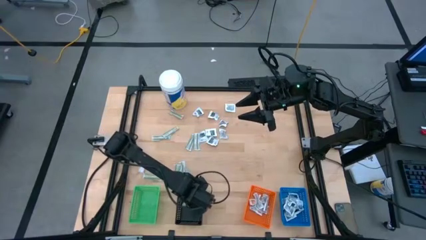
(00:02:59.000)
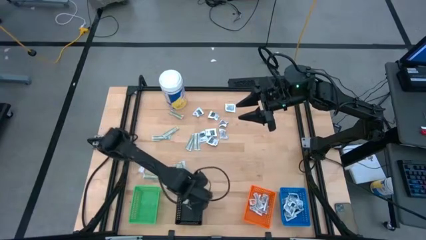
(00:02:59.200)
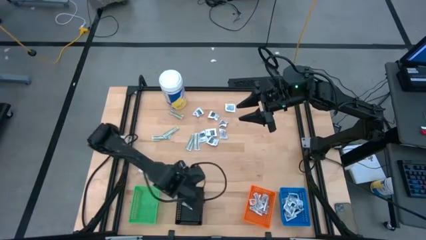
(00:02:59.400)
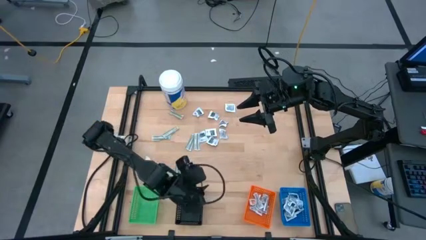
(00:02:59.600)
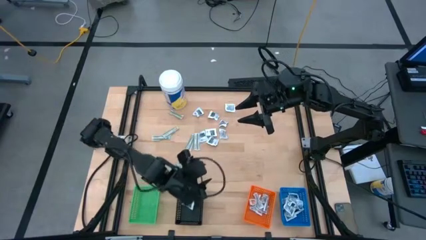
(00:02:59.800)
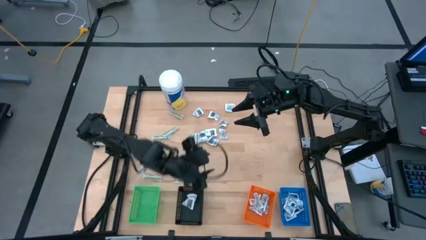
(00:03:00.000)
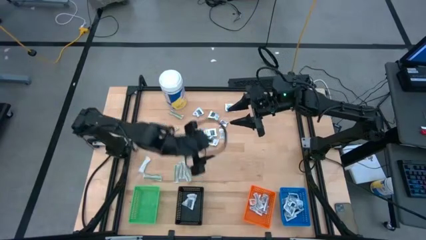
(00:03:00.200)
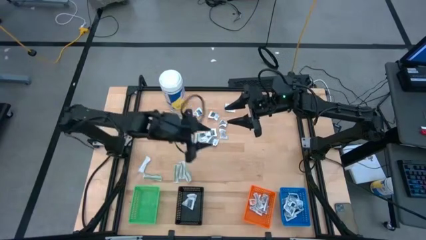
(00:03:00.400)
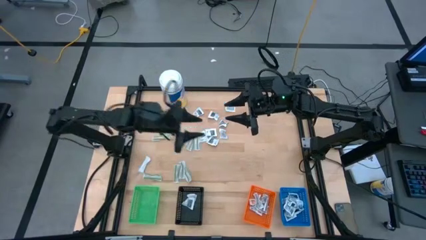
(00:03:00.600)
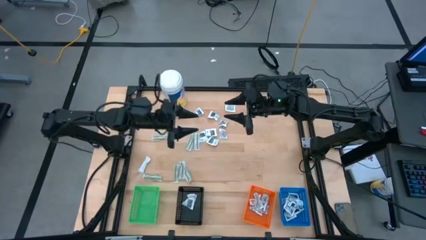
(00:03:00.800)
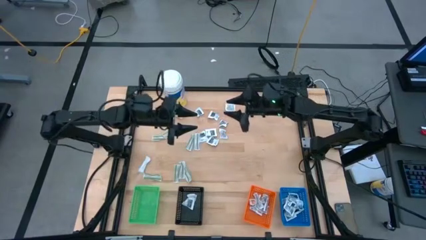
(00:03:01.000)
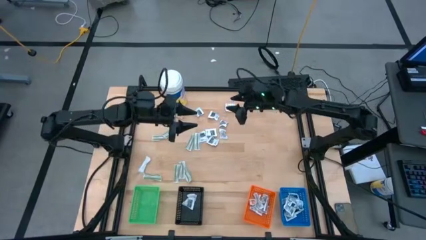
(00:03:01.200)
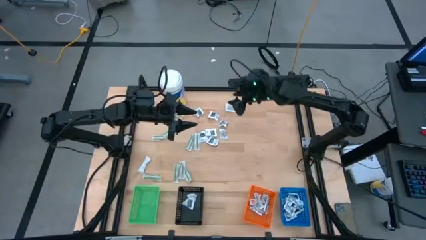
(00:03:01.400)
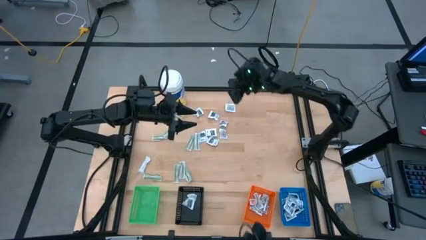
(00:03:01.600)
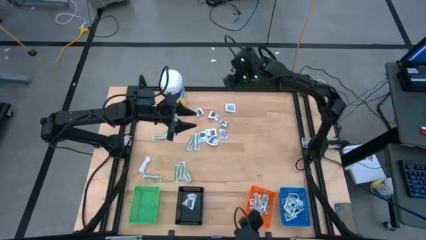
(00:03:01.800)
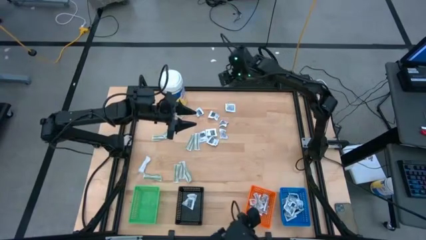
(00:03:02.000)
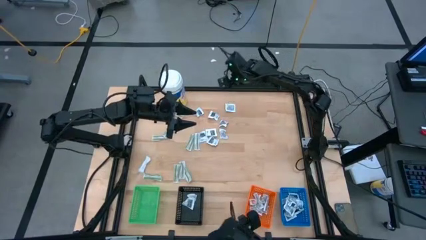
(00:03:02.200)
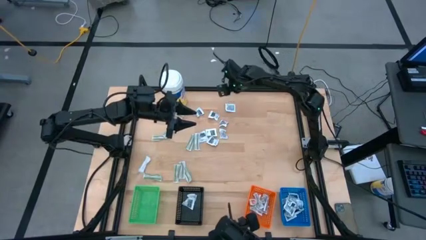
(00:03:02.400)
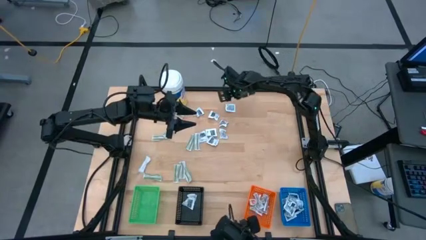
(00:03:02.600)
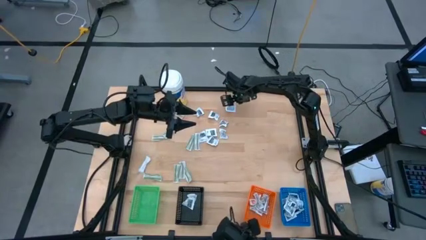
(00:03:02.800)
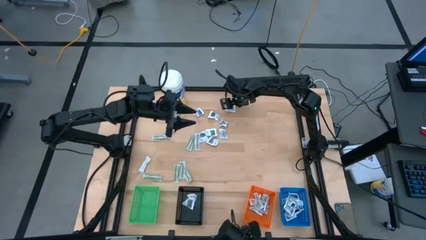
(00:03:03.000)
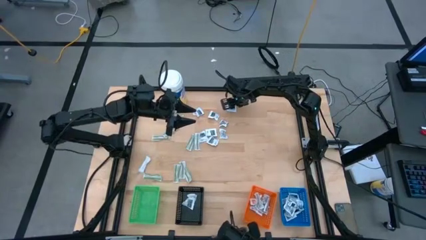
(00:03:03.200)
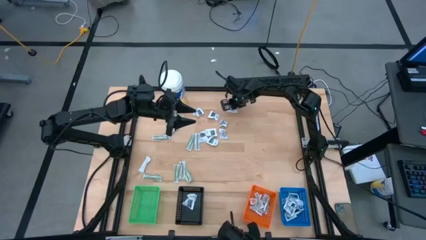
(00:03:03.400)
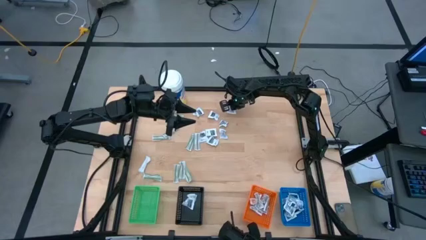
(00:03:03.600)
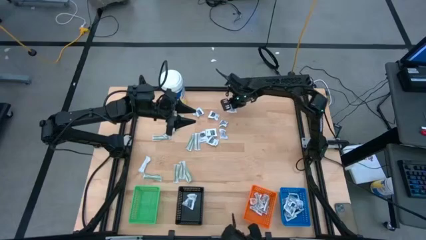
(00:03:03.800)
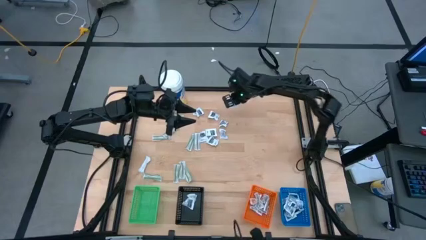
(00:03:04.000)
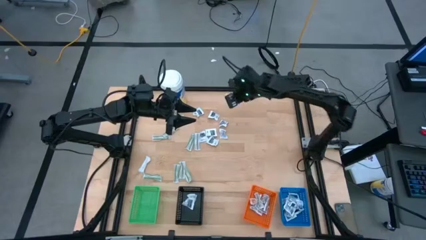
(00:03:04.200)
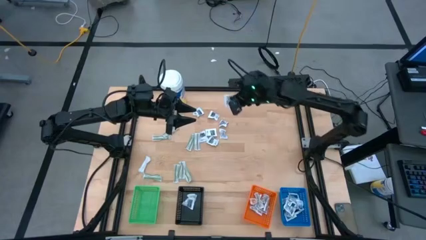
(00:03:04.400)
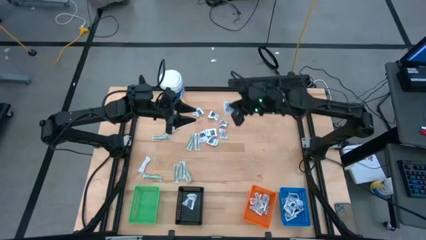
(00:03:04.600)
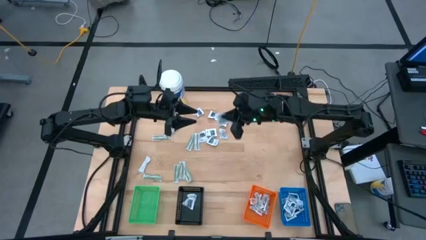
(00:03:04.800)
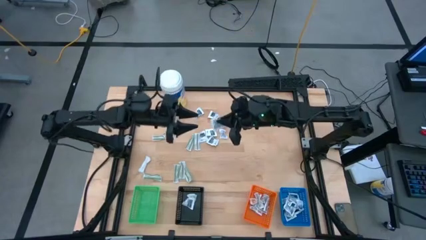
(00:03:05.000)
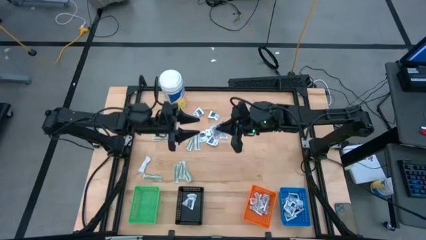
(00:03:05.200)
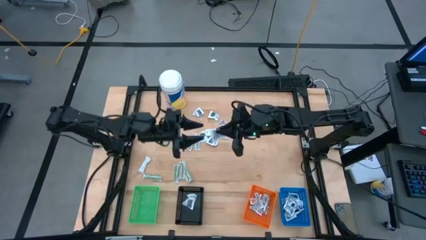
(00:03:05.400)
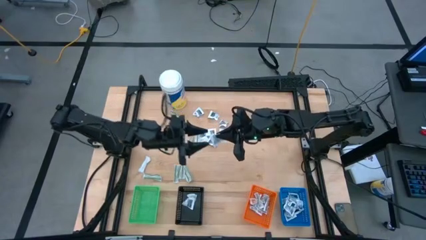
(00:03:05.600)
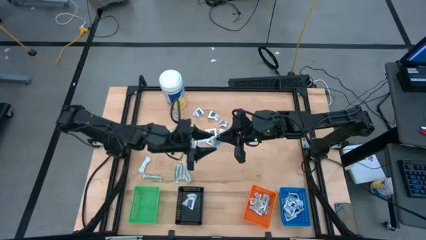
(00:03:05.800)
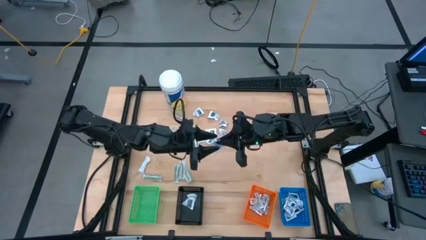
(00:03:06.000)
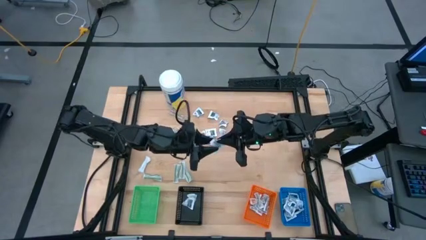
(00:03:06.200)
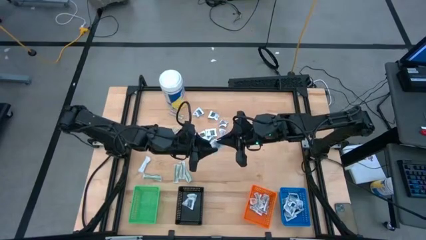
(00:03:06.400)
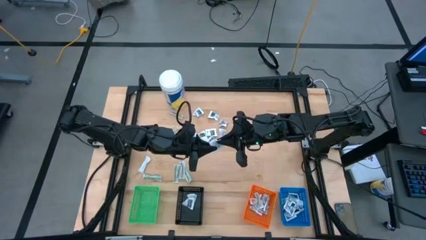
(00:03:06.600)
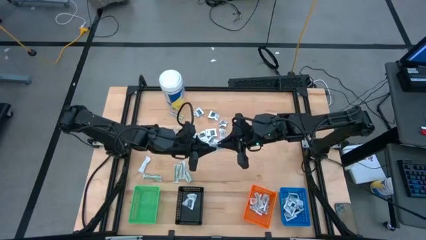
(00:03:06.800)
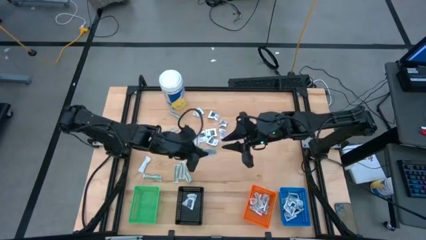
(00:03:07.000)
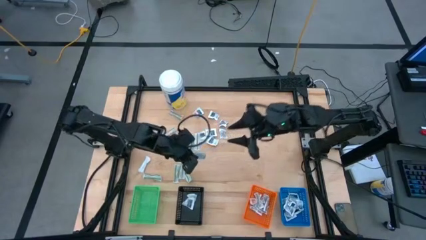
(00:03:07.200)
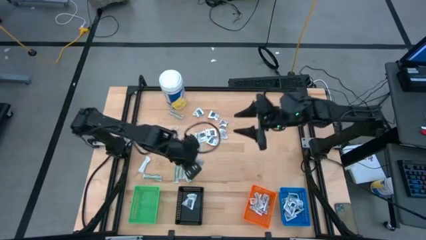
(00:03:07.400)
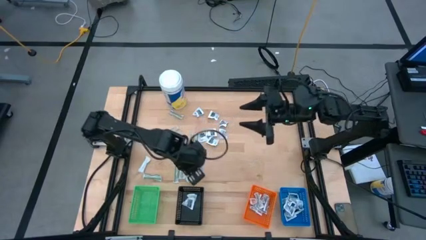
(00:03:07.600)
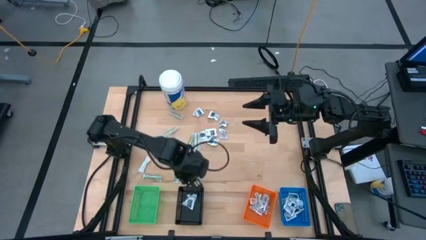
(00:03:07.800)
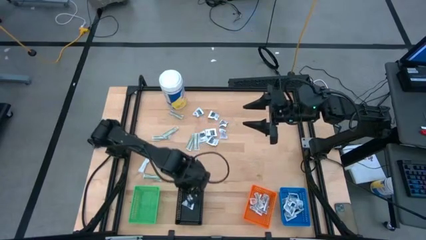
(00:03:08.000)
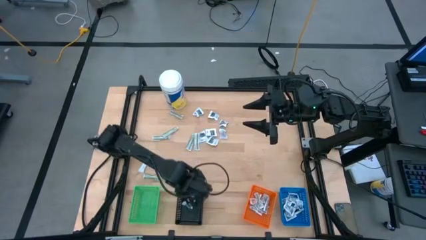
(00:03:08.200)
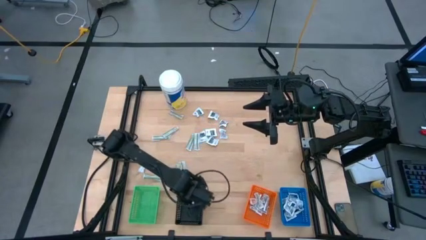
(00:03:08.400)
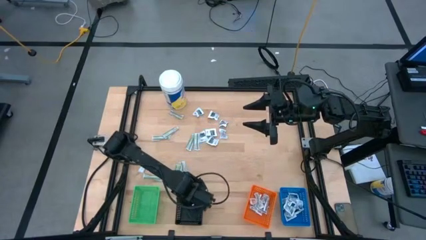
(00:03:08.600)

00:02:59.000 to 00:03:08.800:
Task: Pick & Place First Aid Supplies
Put the towelette pack into the black bin

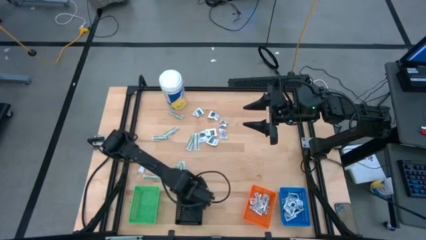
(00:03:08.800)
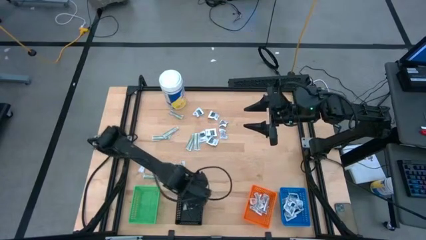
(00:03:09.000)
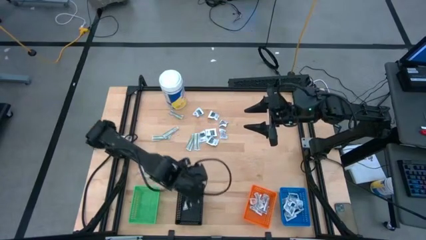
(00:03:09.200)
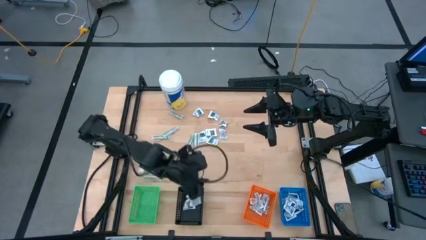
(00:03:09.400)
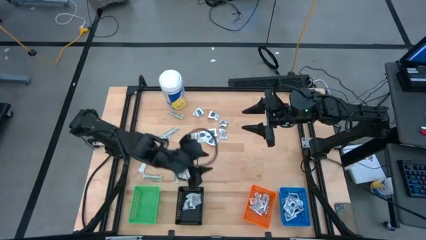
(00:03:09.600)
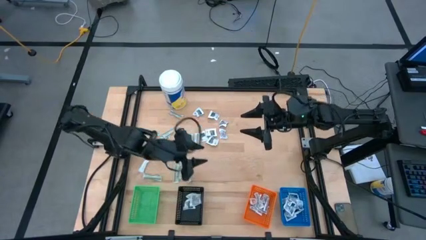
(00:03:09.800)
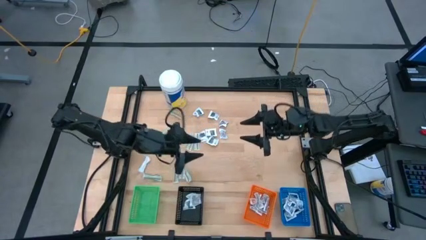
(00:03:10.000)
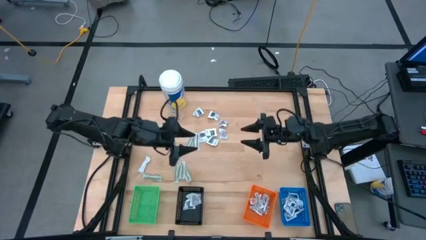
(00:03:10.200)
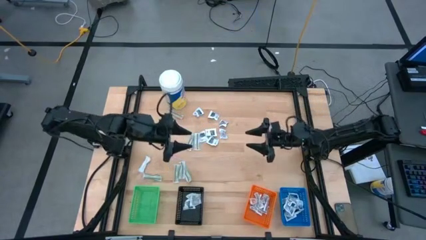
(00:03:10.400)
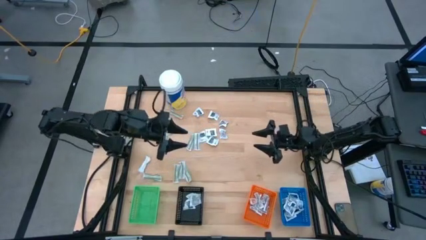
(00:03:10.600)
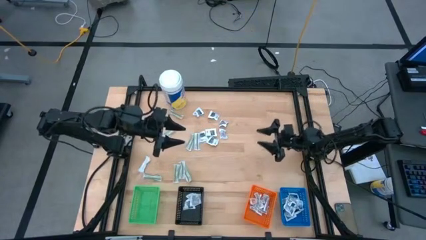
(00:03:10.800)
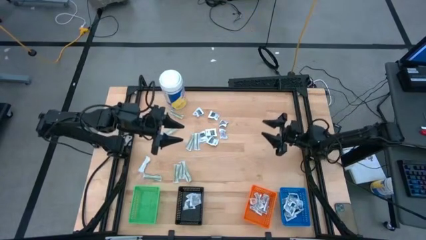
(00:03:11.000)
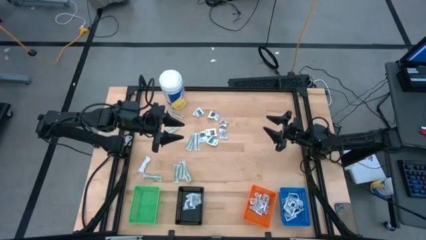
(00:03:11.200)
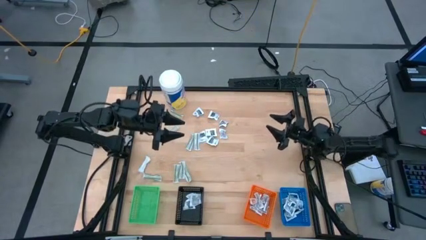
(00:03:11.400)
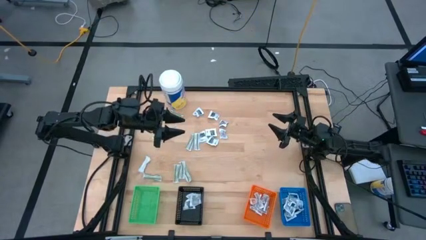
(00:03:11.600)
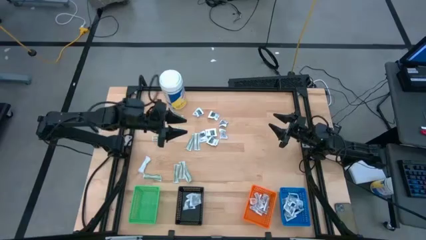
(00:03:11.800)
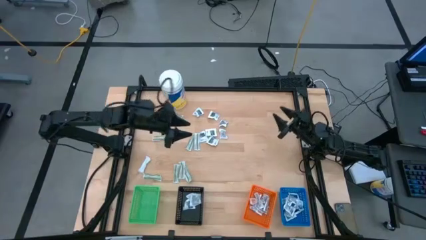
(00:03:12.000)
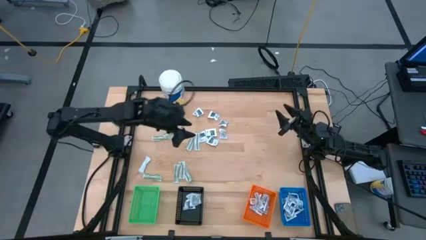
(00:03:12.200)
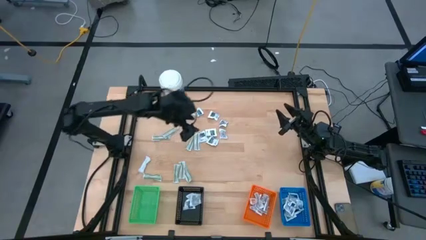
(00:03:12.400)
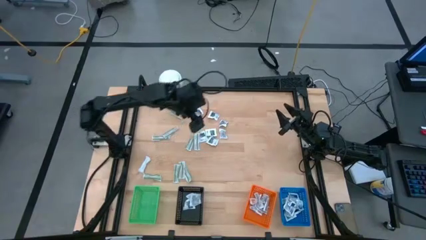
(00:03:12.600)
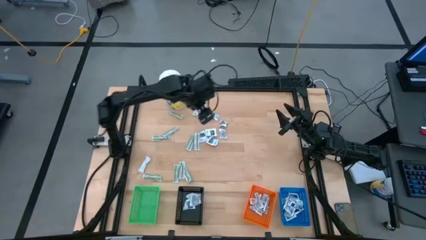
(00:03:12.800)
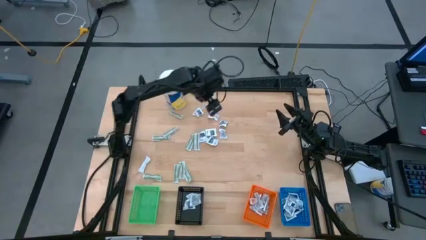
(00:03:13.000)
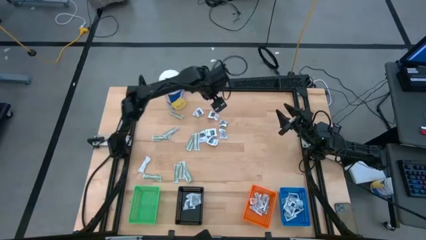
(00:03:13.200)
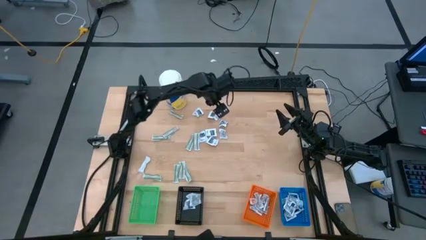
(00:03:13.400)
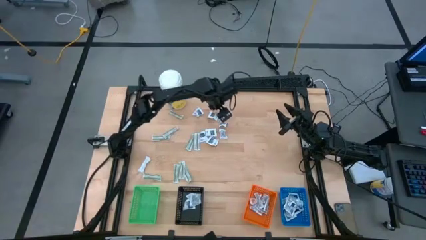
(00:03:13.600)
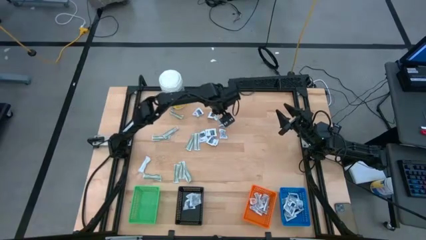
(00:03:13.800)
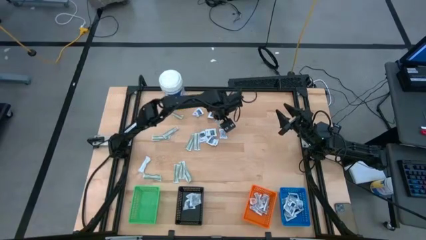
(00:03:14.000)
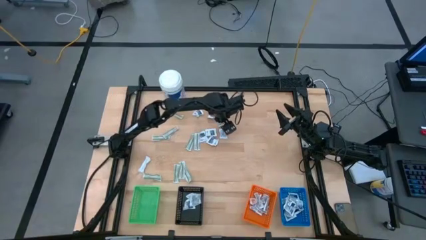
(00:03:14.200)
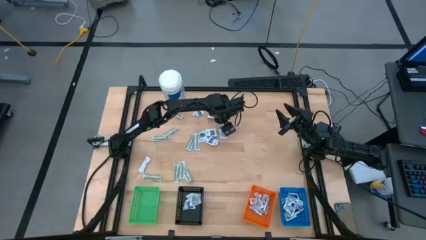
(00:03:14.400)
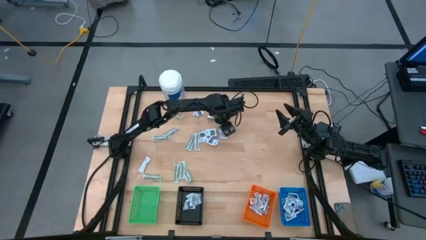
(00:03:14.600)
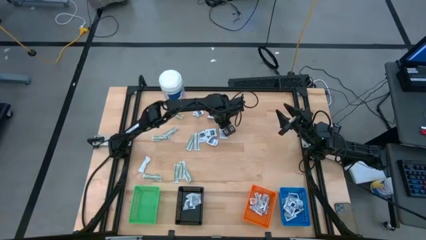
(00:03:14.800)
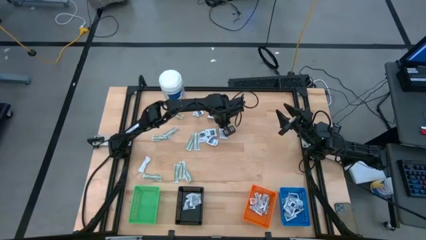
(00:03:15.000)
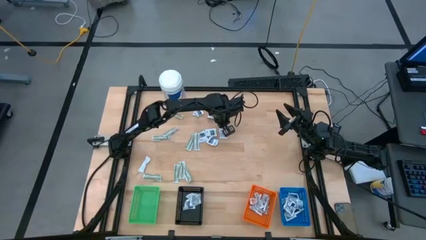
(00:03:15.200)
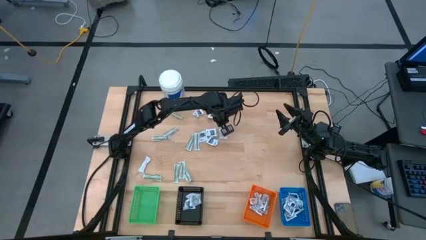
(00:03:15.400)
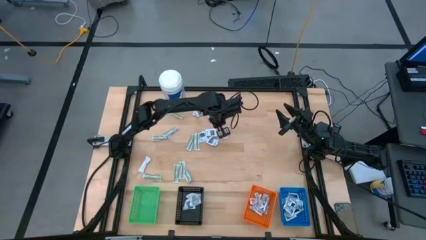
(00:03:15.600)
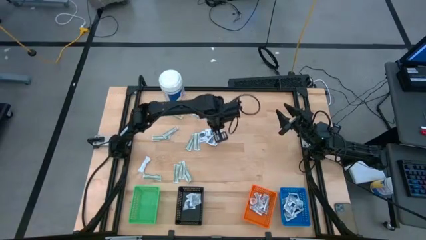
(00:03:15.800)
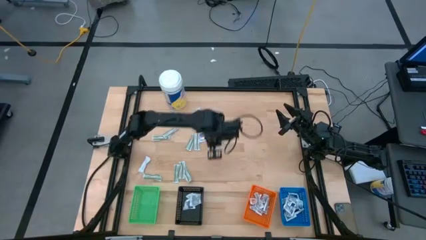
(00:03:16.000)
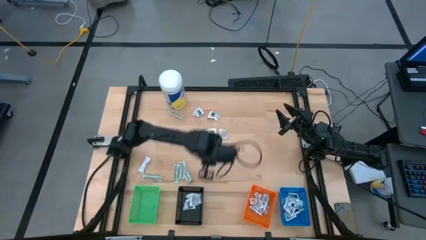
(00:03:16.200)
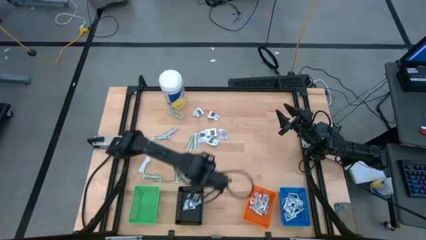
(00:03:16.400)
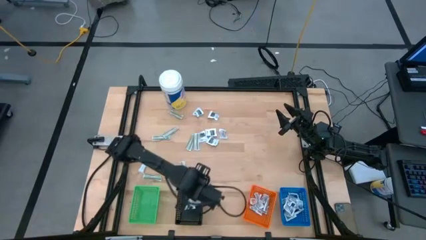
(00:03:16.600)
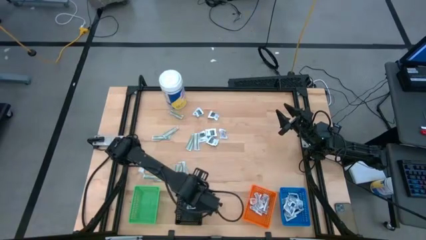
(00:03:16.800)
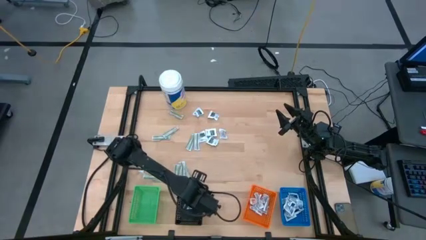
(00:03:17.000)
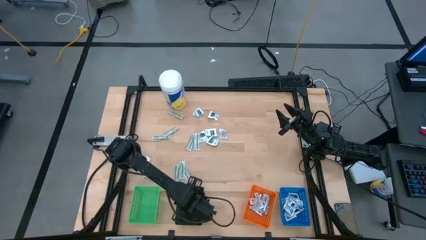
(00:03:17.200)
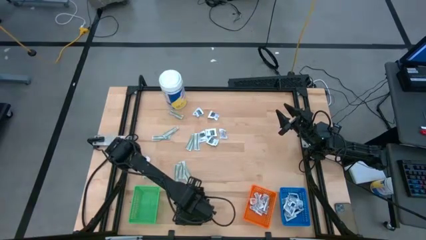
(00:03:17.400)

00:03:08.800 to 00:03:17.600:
Put the towelette pack into the black bin
